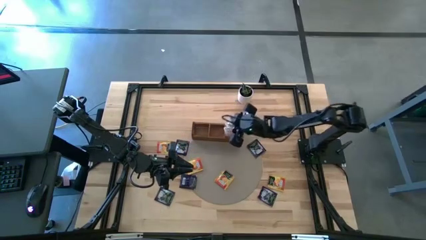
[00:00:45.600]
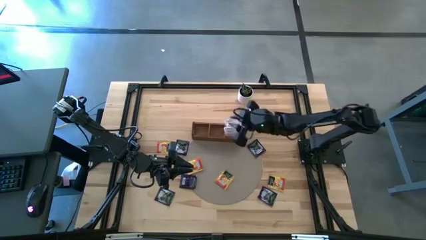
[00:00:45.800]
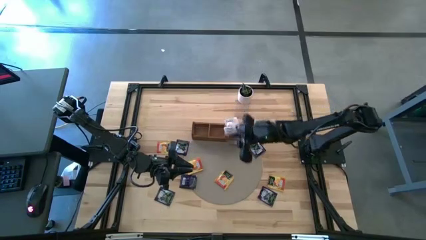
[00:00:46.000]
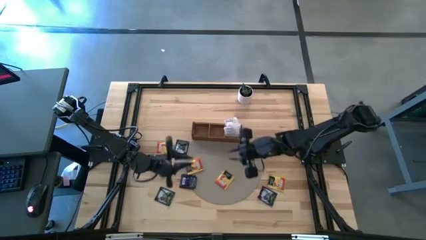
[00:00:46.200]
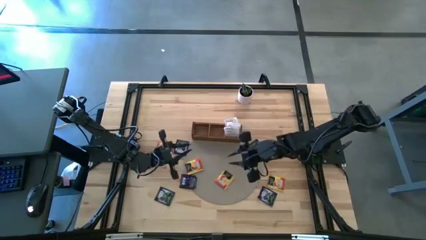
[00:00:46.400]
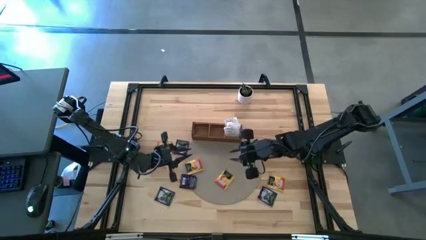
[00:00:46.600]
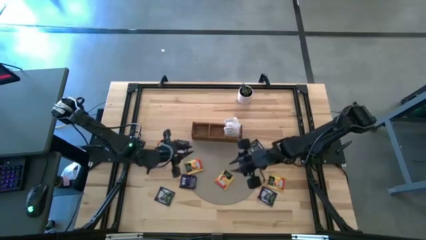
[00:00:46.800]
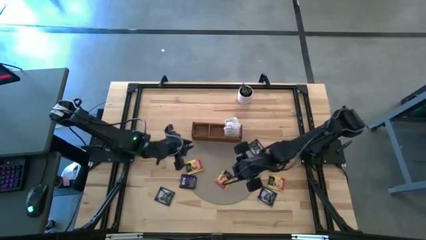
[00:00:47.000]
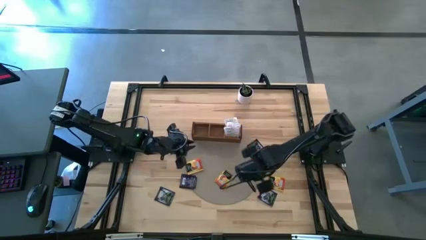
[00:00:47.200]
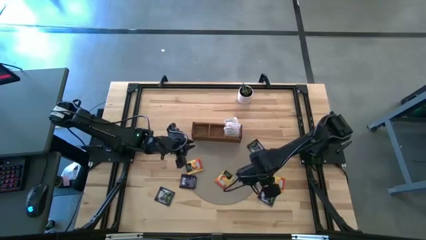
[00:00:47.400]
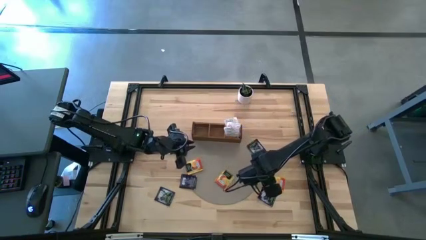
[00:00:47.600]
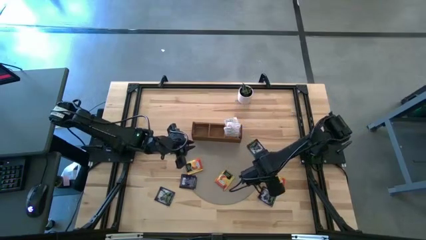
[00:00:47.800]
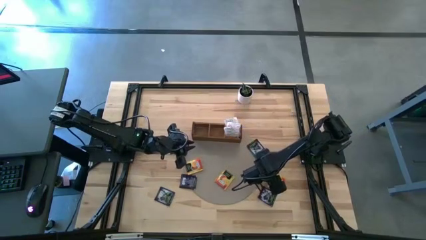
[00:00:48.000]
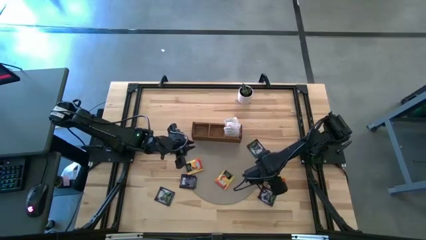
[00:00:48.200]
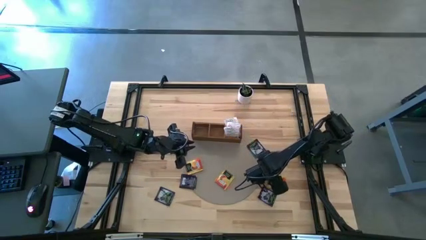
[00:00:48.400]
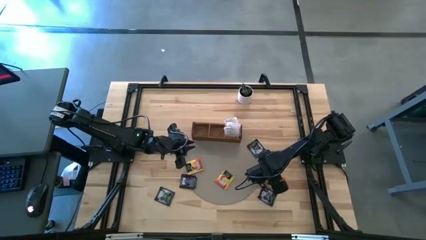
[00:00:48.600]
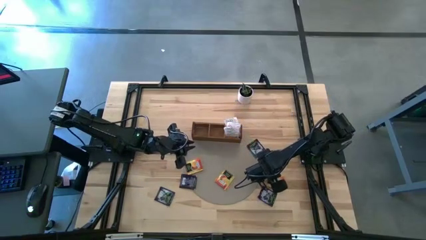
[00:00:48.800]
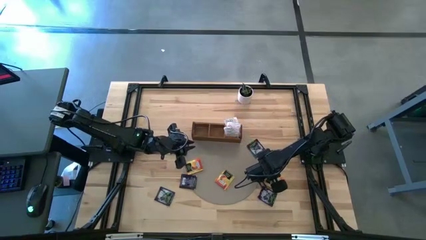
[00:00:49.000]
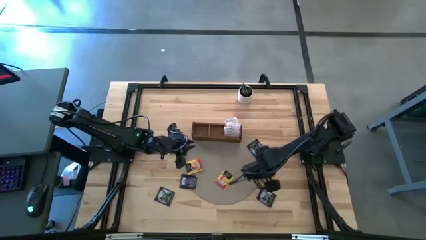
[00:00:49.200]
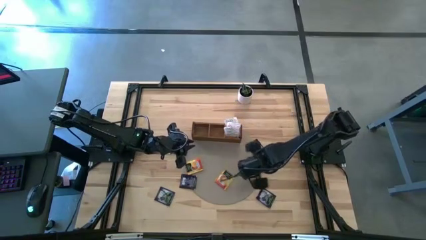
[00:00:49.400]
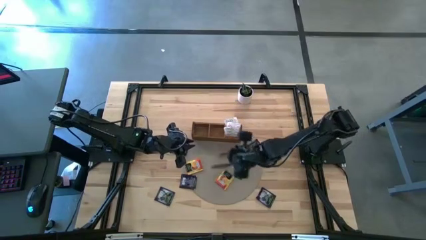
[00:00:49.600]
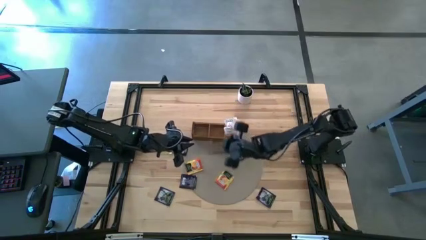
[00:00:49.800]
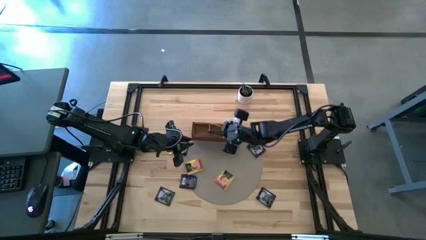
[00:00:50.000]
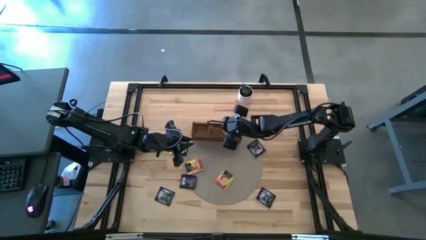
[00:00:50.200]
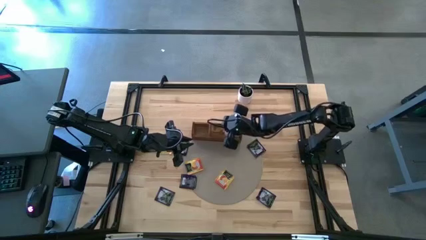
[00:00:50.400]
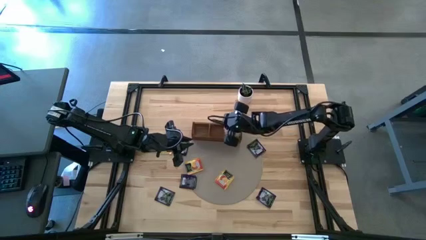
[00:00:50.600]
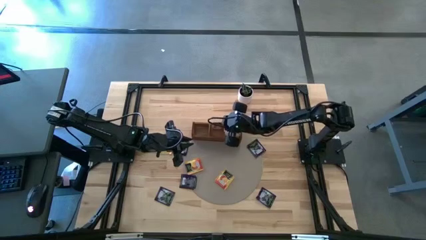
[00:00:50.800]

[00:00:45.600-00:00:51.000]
Task: Pick & Place Tea
Put the yellow tea bag into the middle section of the wooden organizer

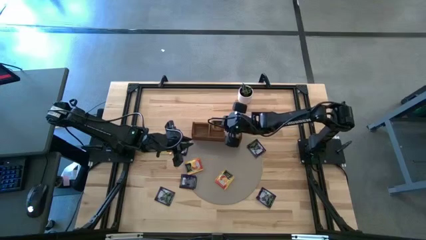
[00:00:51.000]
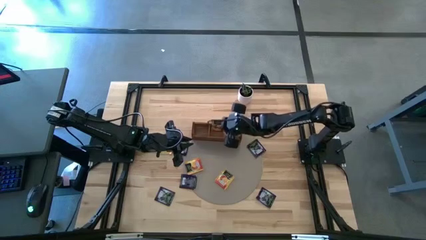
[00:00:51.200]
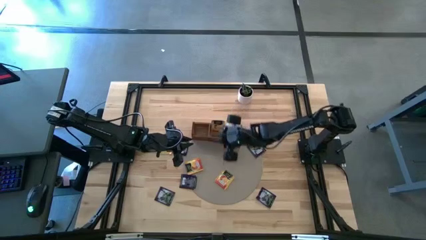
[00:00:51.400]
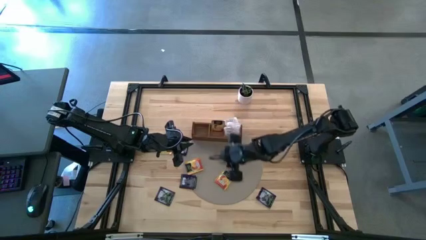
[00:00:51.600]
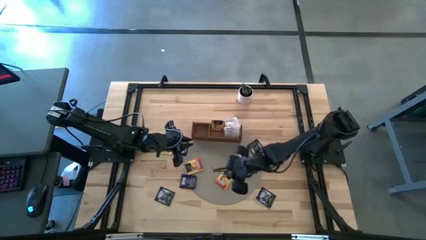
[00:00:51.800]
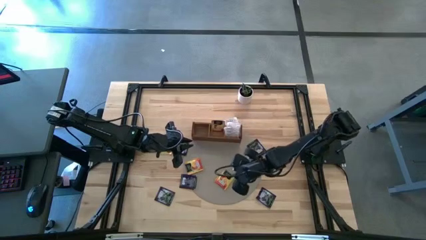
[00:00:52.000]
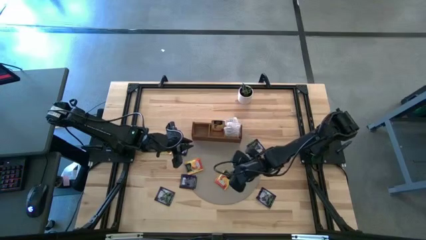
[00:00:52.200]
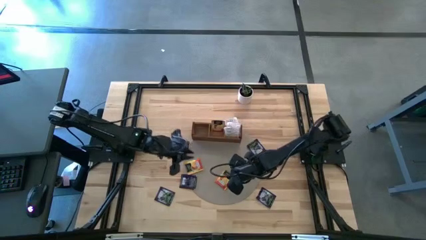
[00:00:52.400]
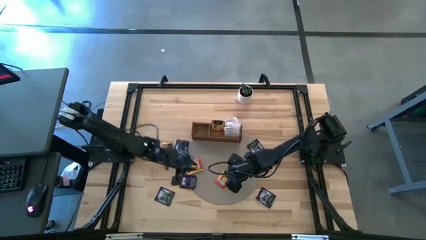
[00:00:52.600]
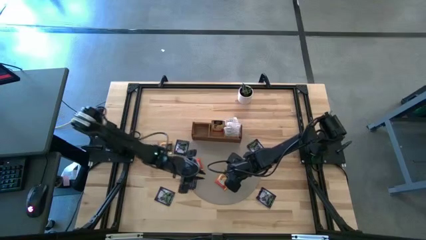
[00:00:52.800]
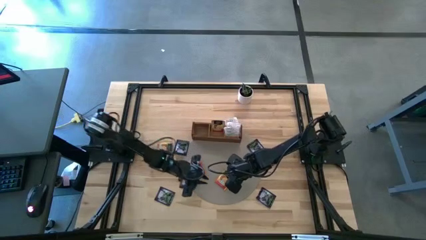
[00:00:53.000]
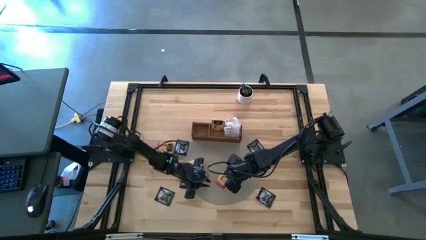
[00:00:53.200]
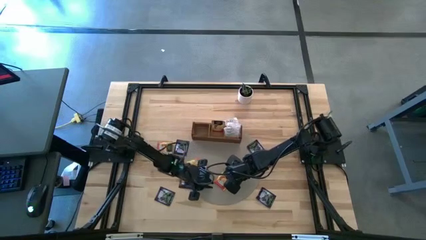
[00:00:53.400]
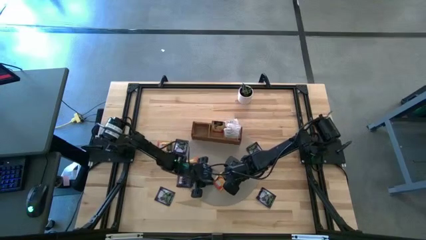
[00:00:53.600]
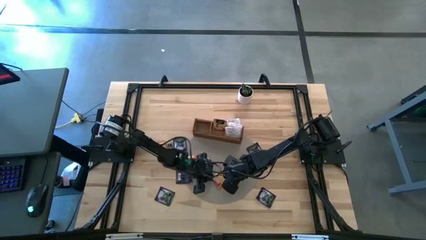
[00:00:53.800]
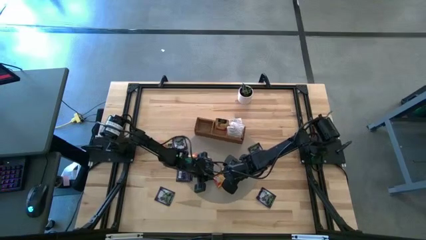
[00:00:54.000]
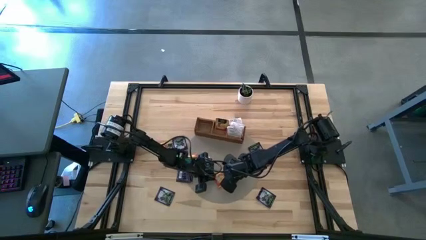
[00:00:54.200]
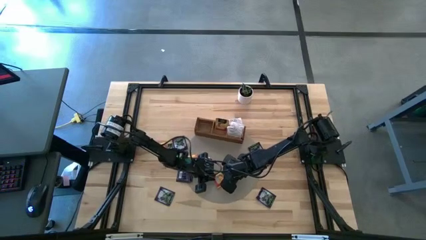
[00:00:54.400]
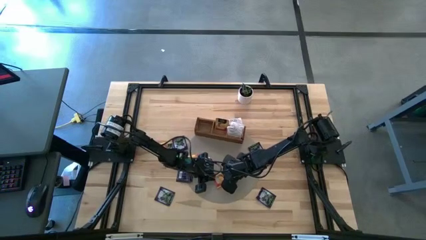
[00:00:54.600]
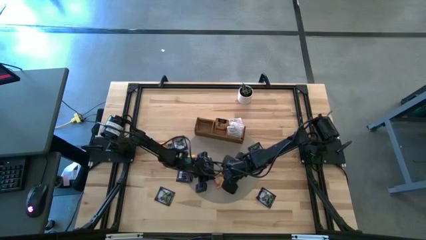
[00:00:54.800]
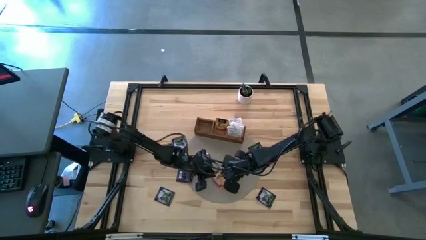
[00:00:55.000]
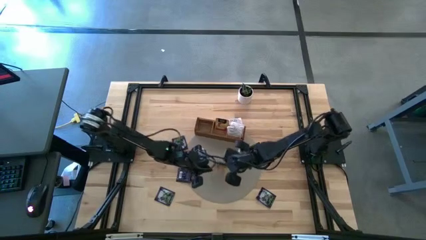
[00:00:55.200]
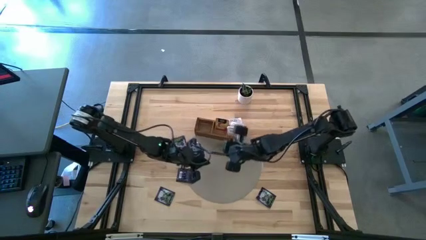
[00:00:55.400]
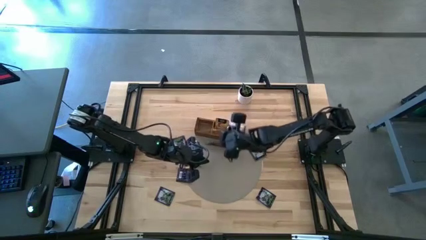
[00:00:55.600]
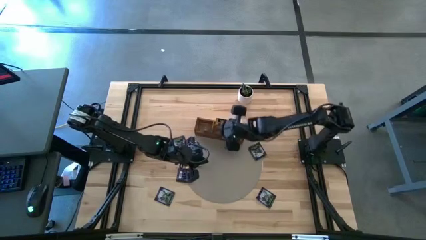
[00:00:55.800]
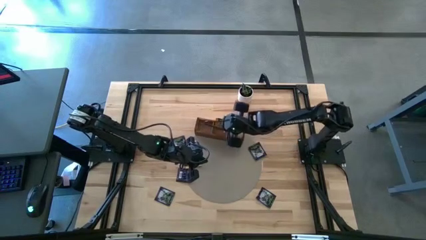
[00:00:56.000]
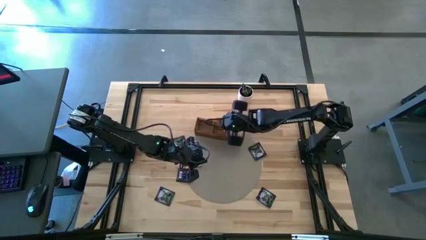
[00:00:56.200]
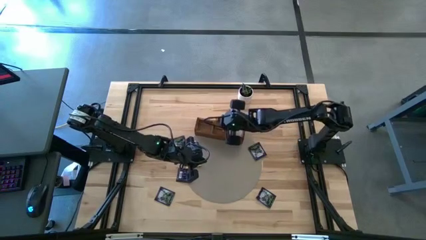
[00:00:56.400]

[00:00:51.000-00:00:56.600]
Put the yellow tea bag into the middle section of the wooden organizer

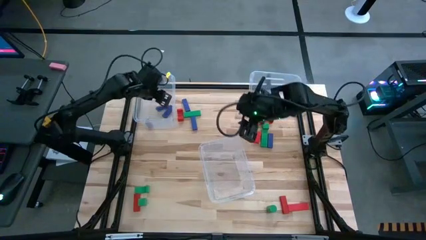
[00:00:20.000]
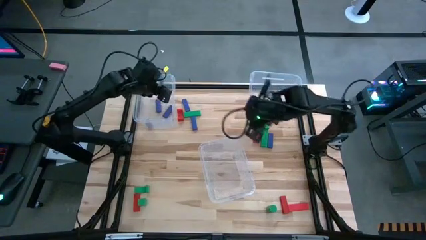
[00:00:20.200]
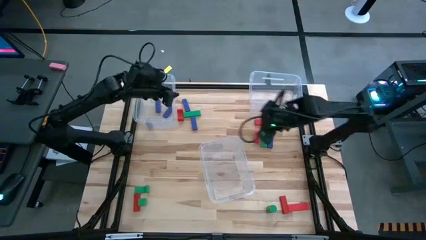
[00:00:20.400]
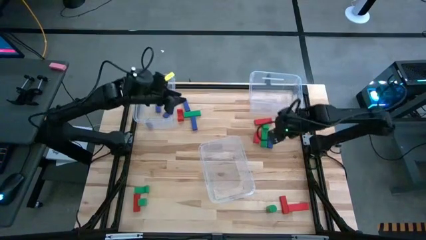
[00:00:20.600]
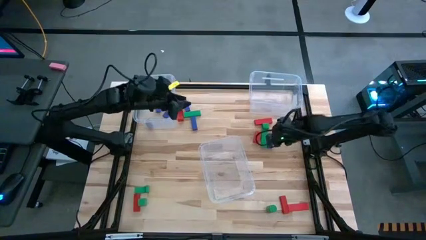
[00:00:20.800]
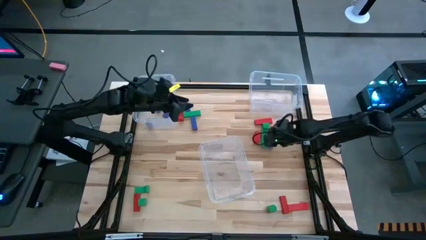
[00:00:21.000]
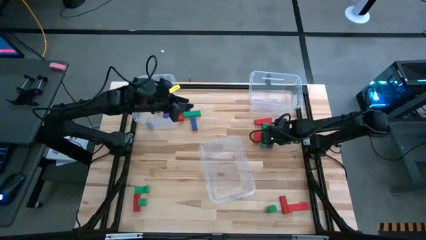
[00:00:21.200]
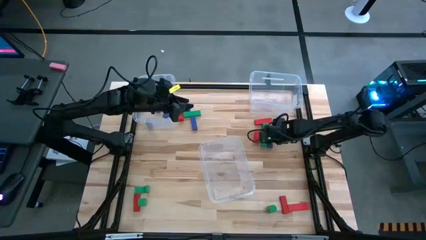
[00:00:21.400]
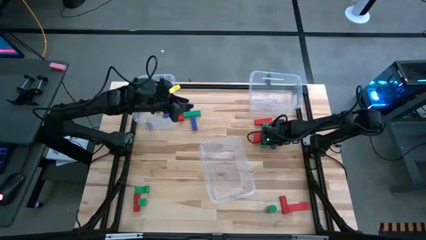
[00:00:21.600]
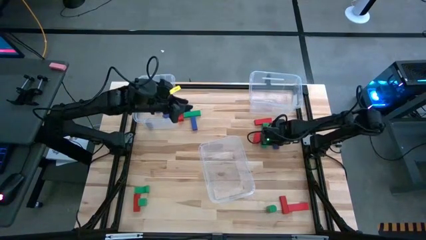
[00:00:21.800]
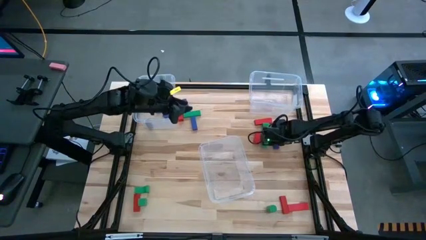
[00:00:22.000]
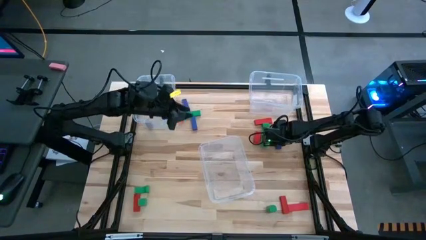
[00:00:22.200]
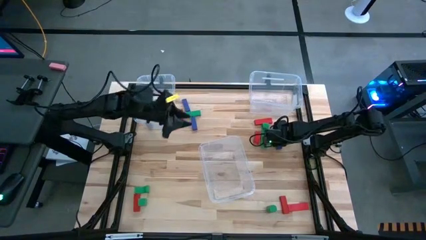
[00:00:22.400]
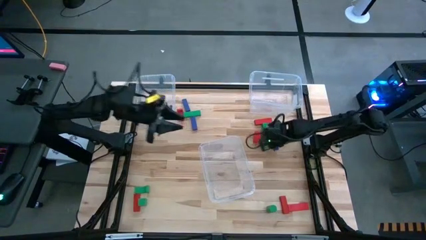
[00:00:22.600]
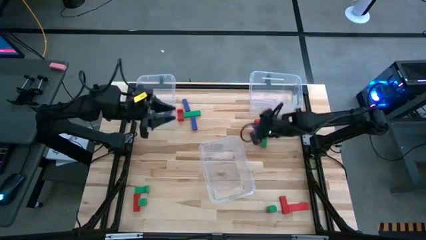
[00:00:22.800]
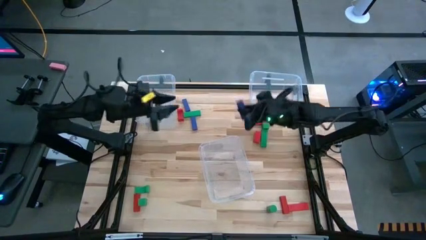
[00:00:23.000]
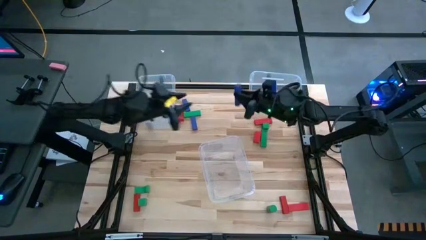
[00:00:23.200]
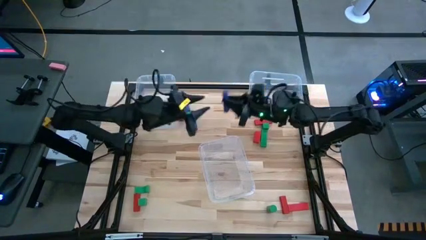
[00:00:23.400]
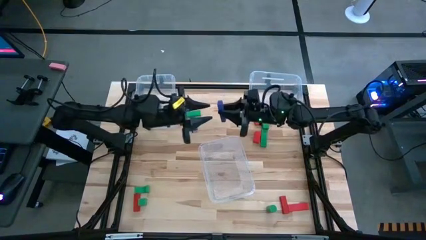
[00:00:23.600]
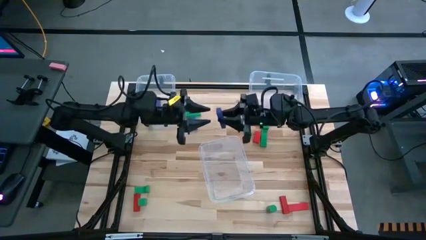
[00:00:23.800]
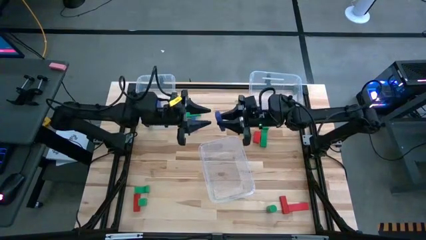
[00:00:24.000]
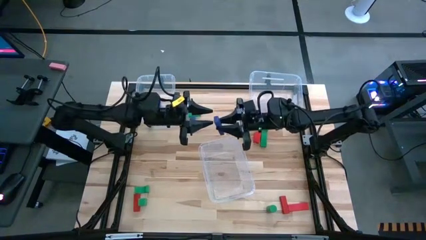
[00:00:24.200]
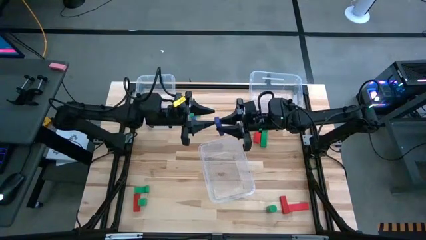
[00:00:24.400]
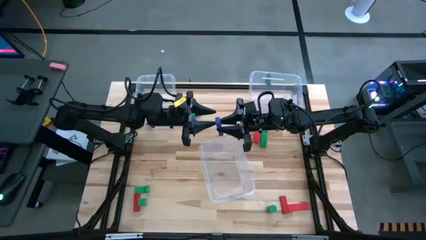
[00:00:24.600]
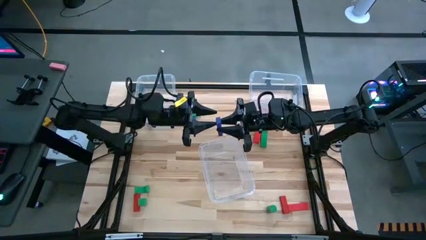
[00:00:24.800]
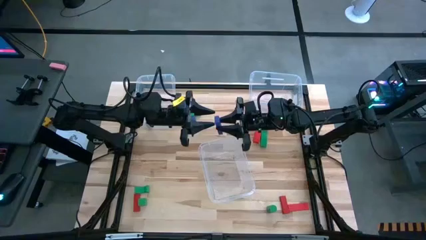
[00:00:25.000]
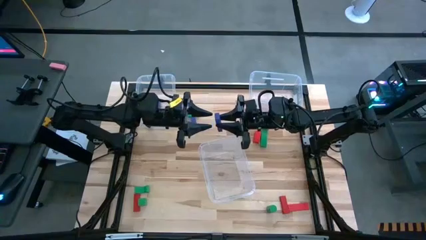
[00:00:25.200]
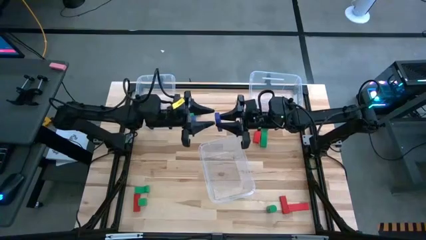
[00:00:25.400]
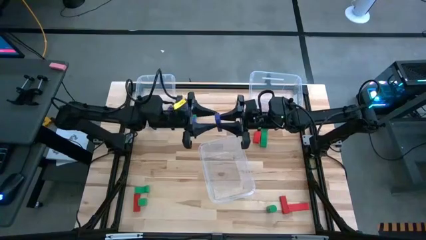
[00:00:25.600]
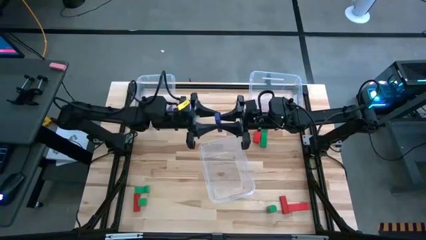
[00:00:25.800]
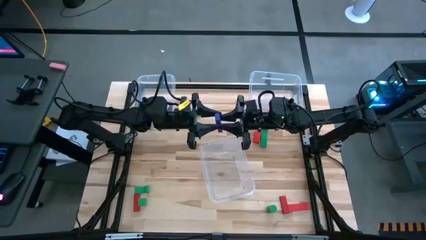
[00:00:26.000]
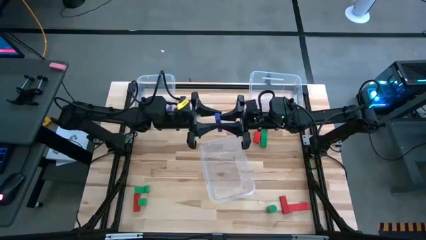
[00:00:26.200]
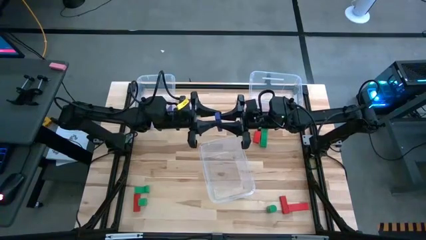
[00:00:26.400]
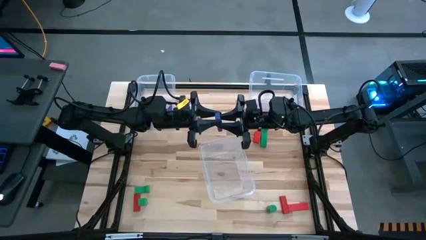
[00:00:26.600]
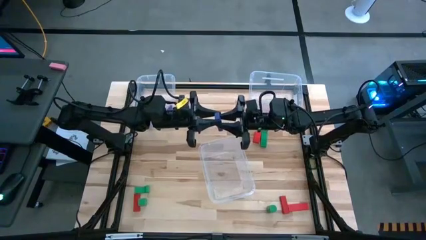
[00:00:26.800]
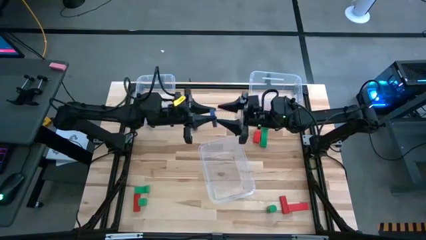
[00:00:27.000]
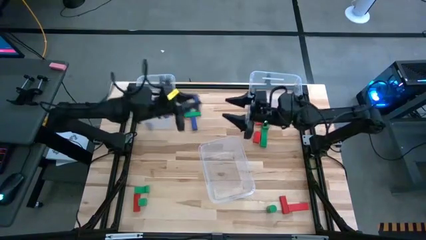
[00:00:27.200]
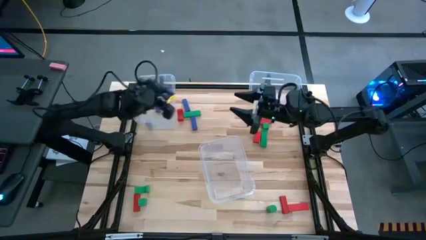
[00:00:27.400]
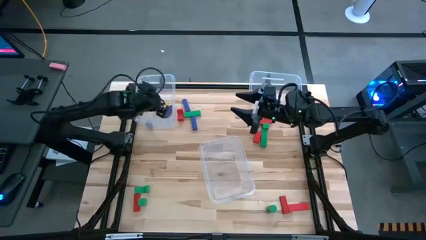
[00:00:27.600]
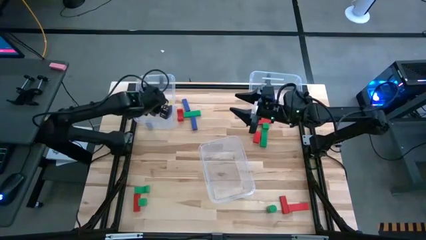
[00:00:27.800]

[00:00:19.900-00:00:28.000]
Task: Sort blocks
Put the blue block into the top left transparent bin
